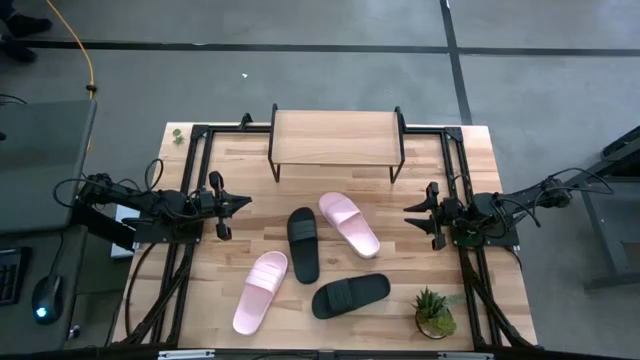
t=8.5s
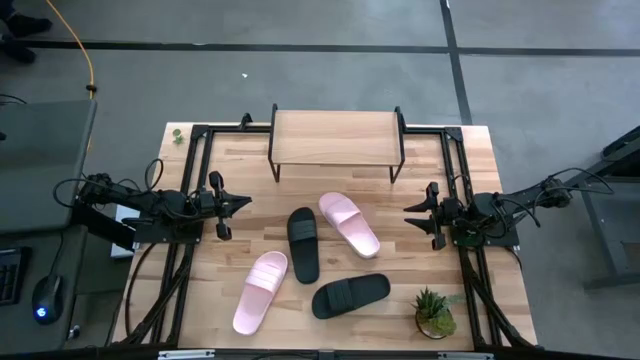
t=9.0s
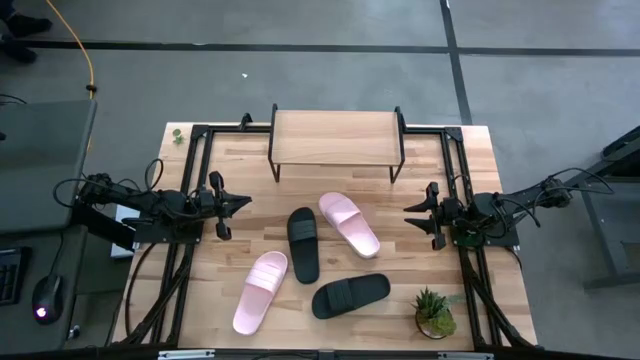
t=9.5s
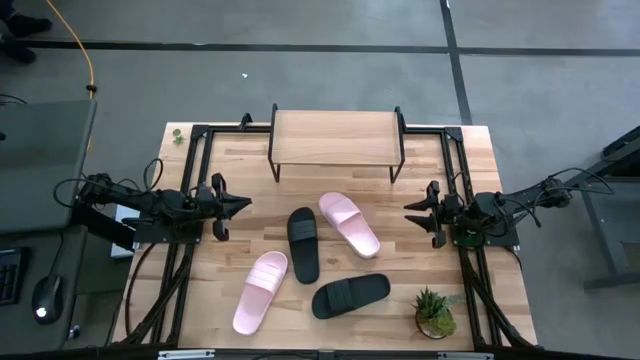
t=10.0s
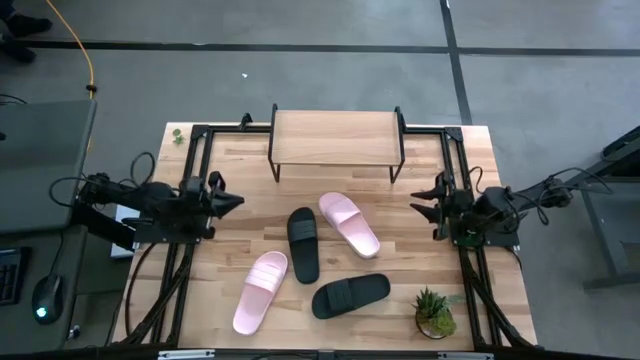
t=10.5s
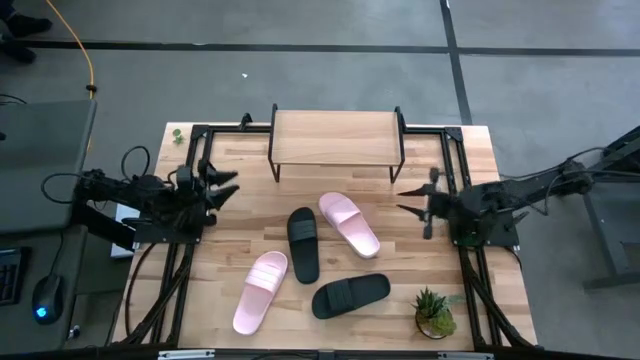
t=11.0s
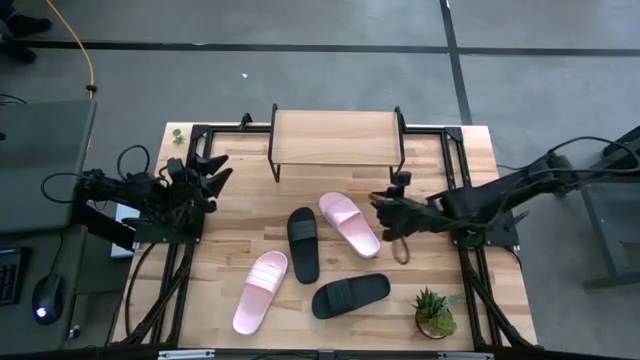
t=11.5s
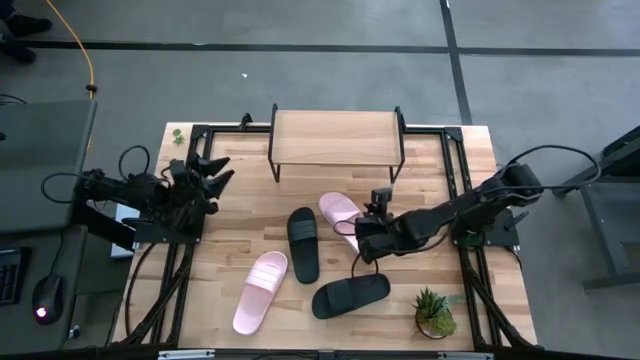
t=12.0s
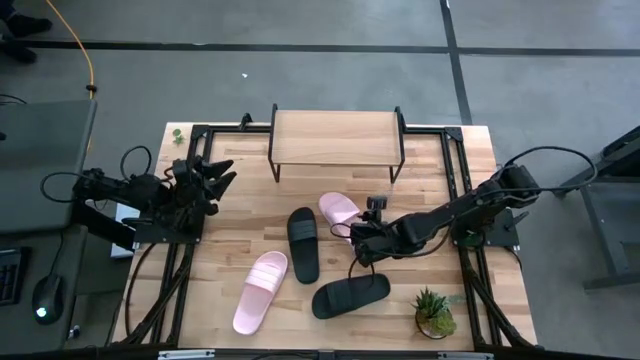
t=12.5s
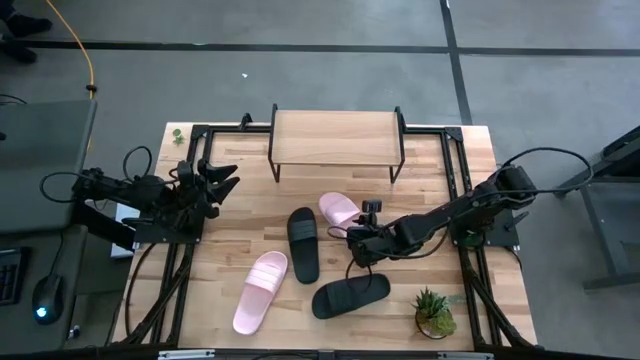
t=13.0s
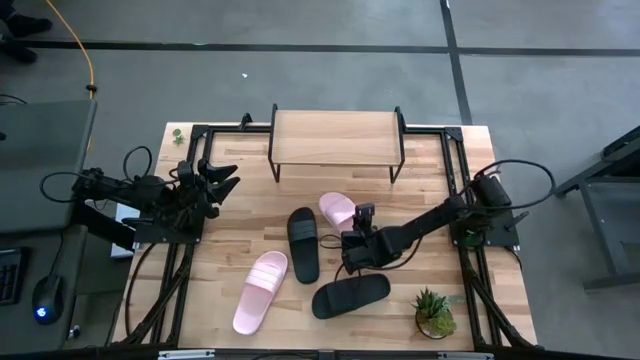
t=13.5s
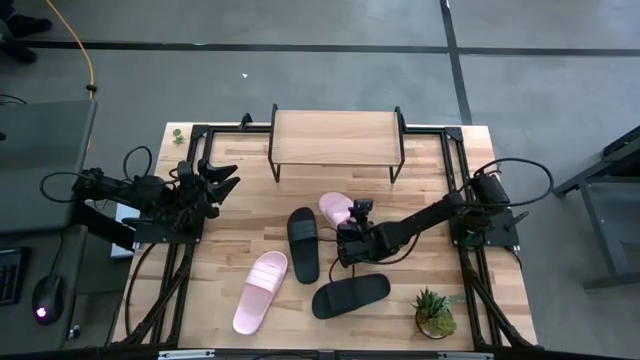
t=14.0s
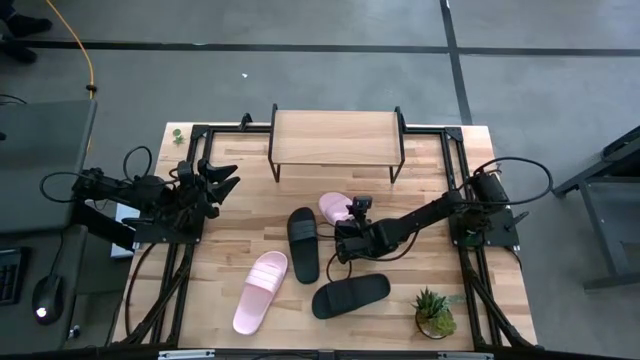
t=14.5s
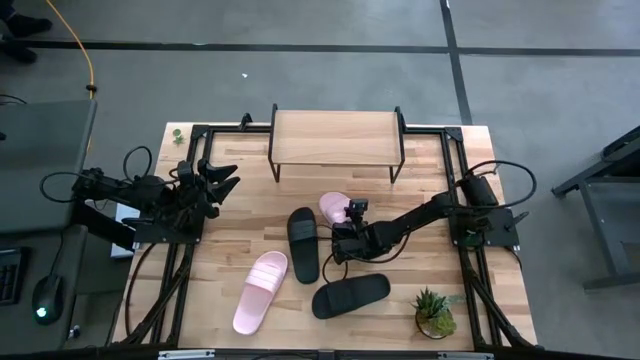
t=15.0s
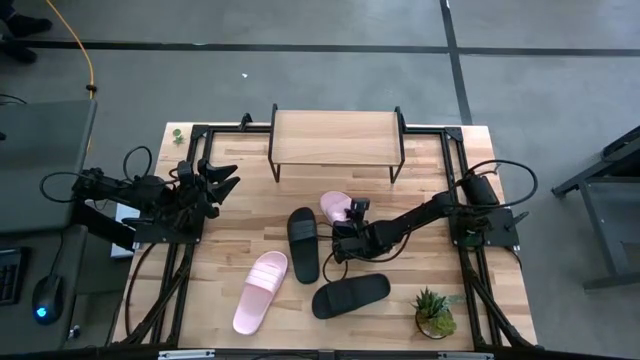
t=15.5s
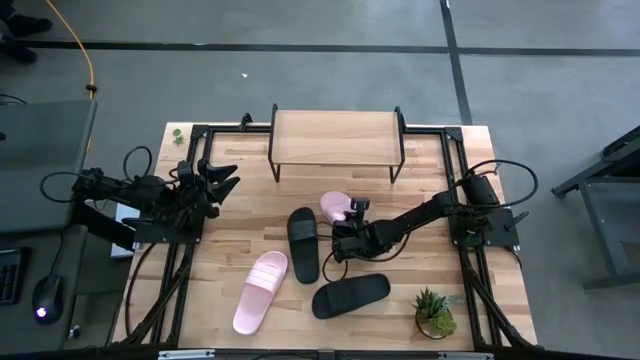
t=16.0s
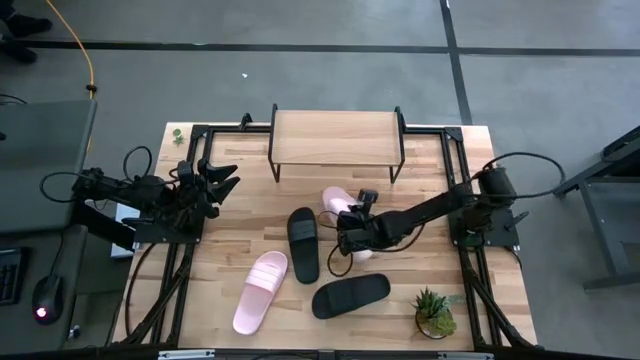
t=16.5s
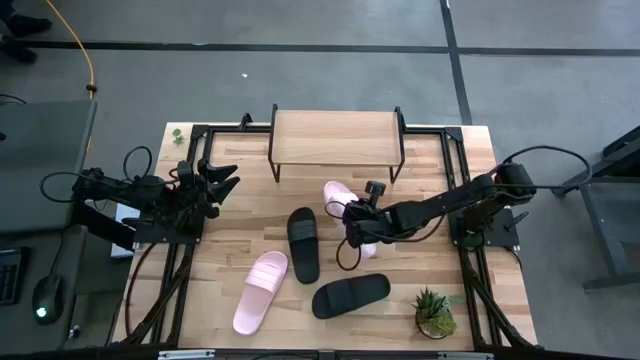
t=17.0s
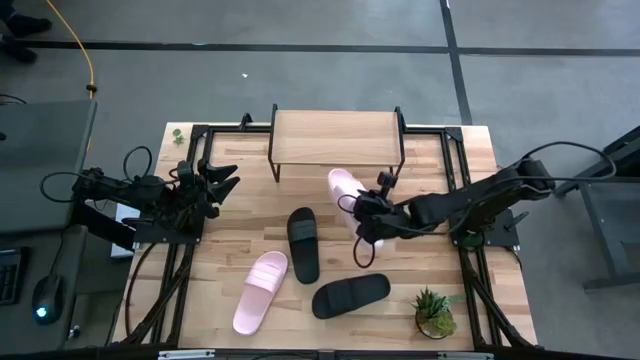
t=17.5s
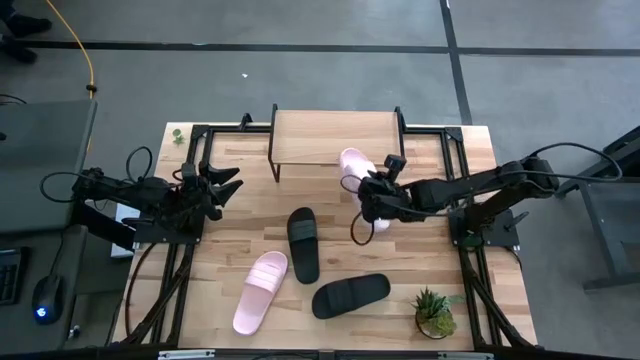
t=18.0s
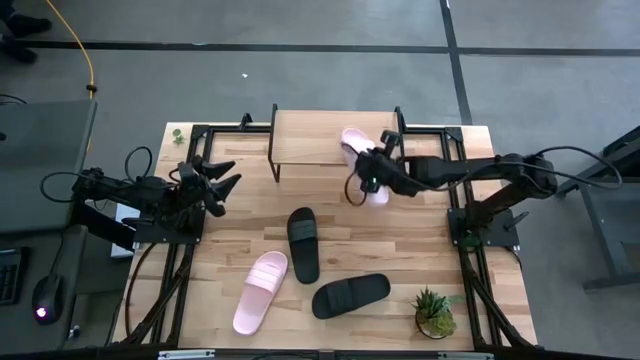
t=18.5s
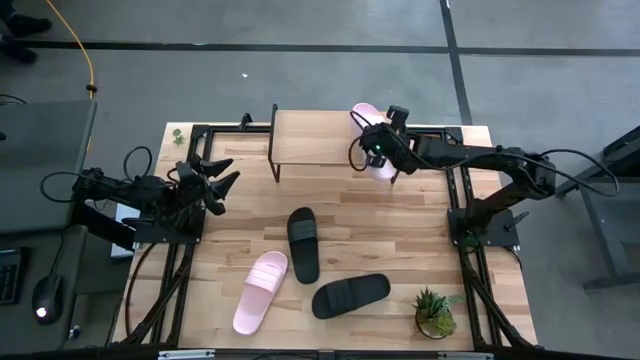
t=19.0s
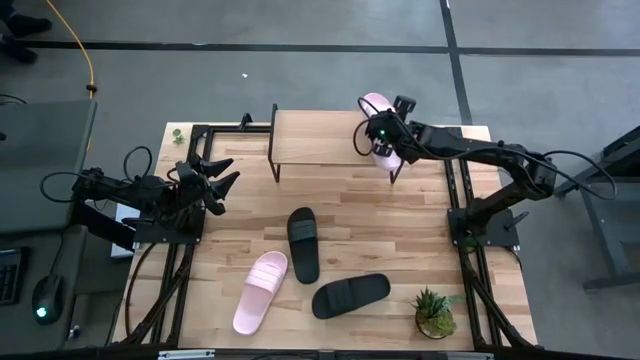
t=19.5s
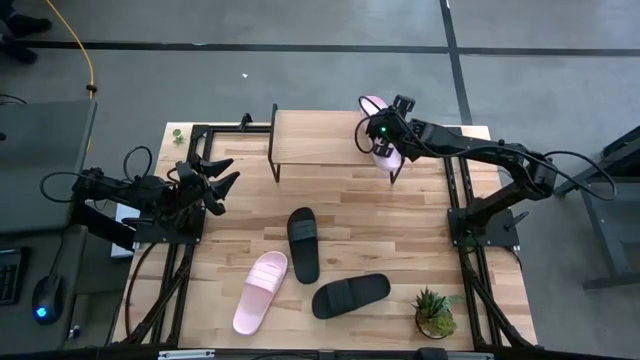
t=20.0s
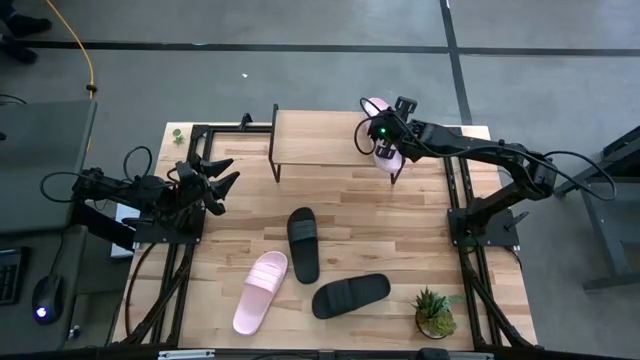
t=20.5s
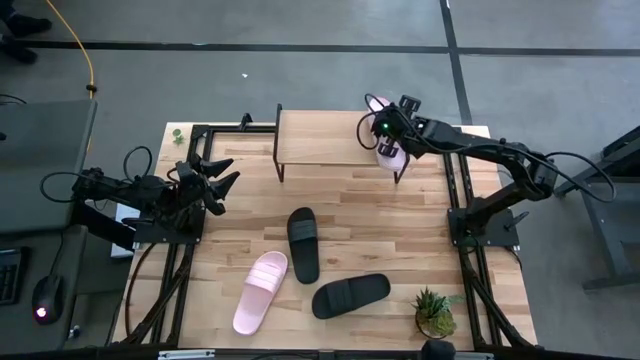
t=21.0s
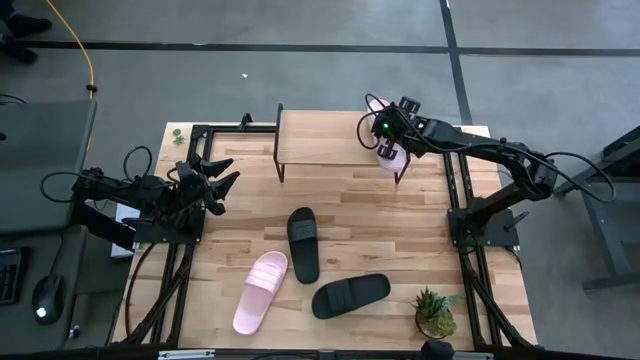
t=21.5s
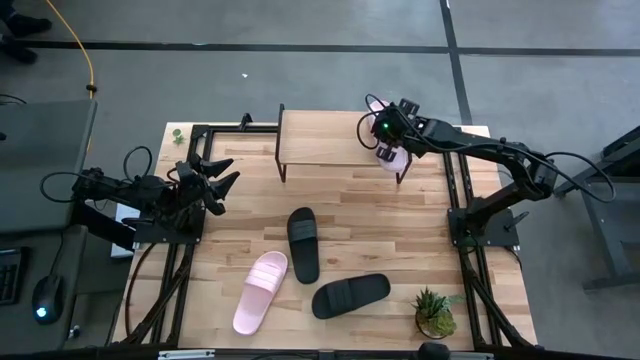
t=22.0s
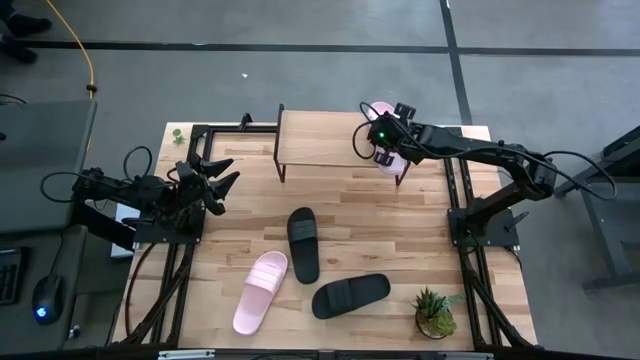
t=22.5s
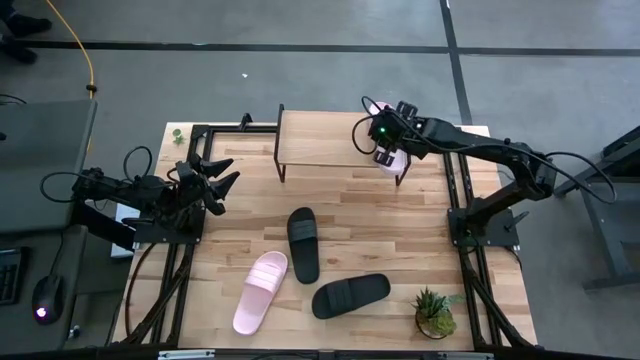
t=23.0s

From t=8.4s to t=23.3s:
Task: Pick and place slides into the shelf
Put the top pink slides on the shelf

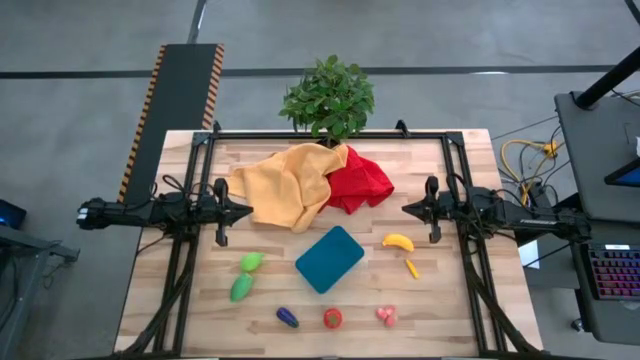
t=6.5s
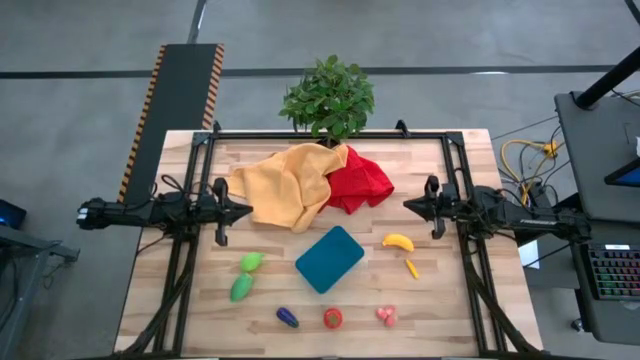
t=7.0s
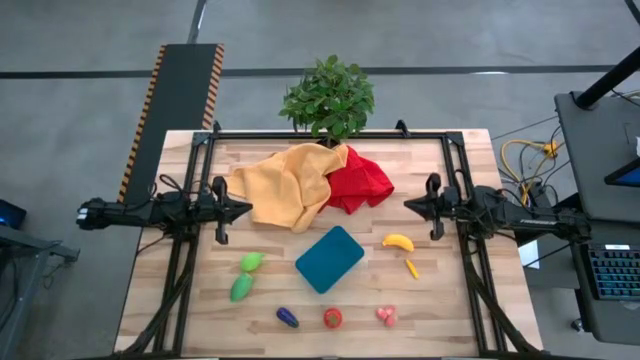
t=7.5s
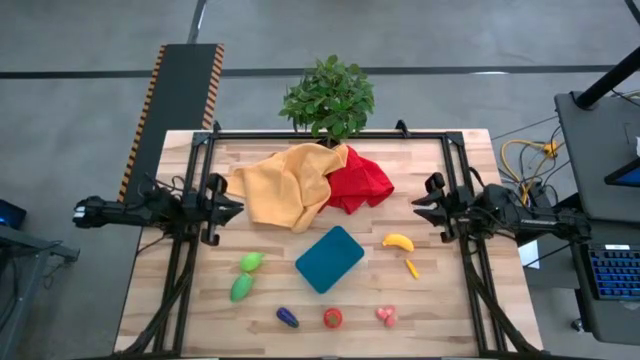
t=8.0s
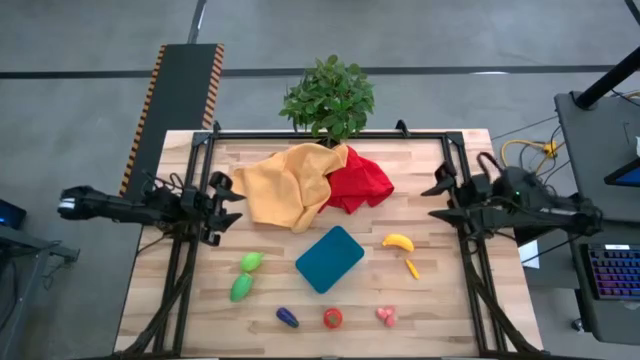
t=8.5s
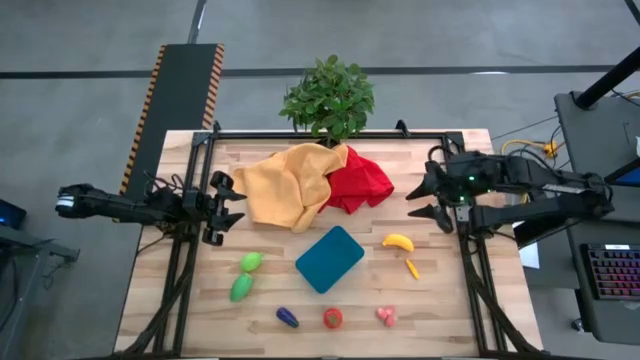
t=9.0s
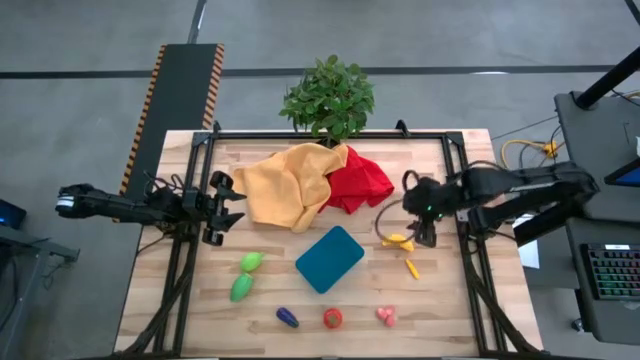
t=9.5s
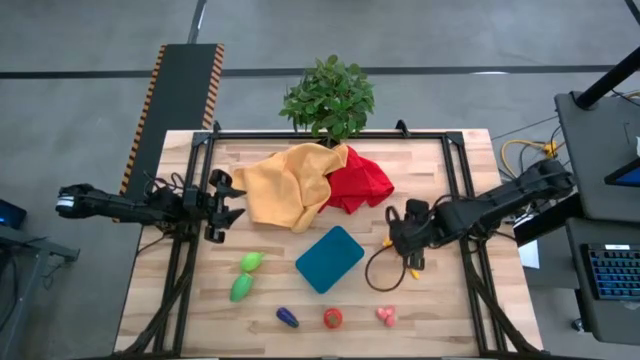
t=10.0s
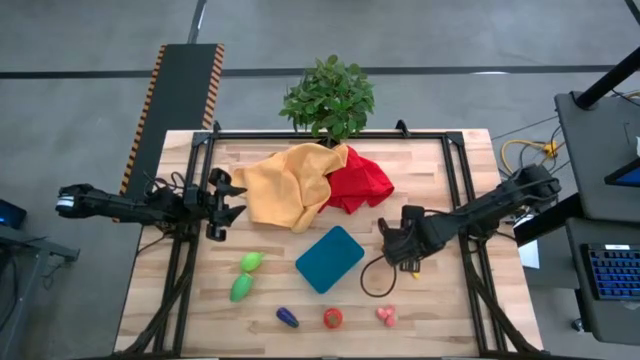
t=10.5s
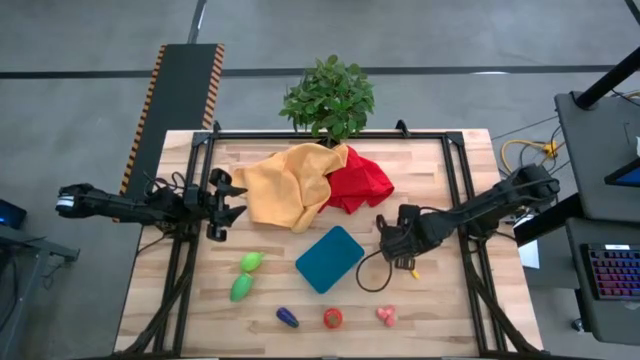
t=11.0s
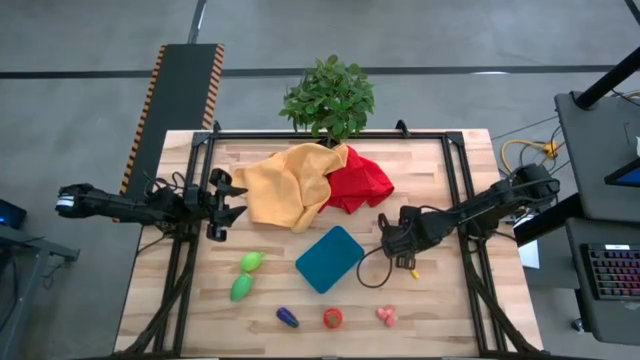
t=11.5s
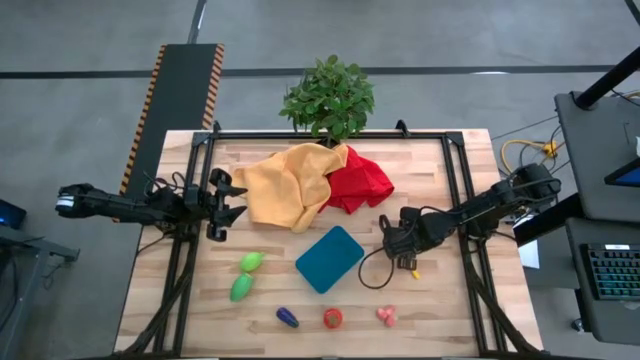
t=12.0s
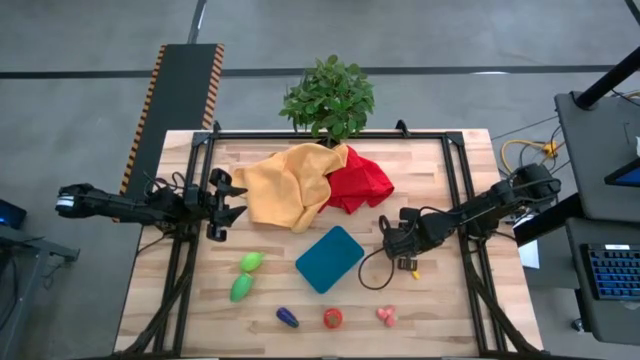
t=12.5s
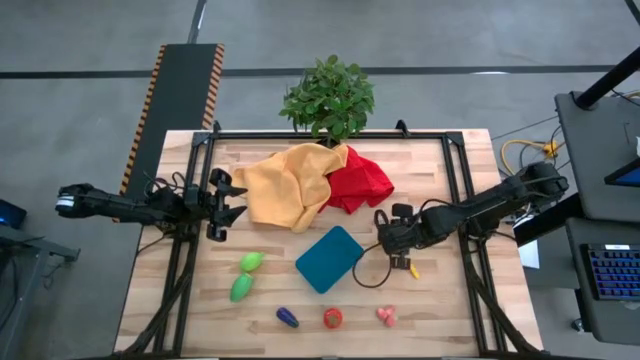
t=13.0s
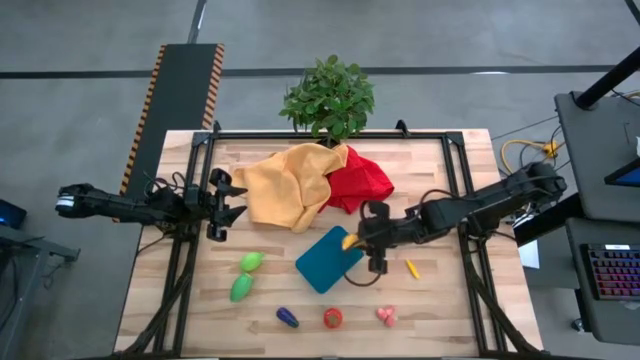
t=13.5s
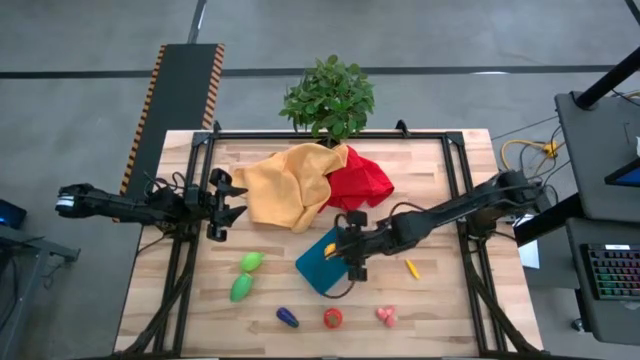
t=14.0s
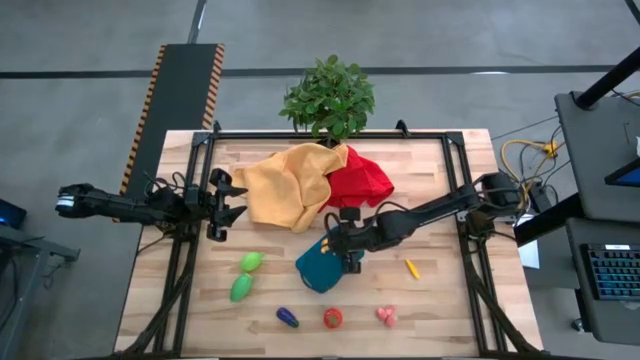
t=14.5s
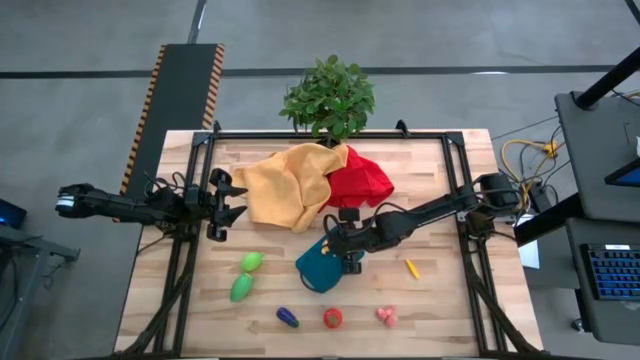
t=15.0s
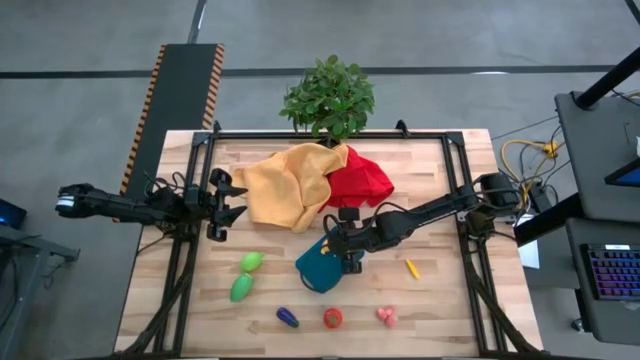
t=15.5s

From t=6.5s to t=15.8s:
Task: Pick and placing Produce into tupperware
Put the yellow banana into the blue bin
